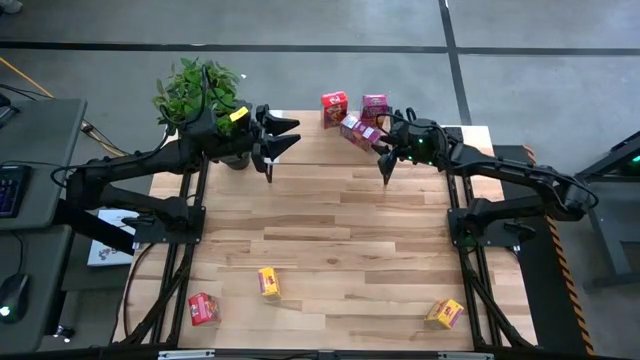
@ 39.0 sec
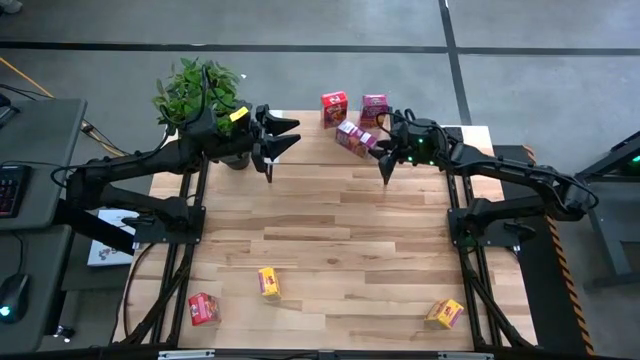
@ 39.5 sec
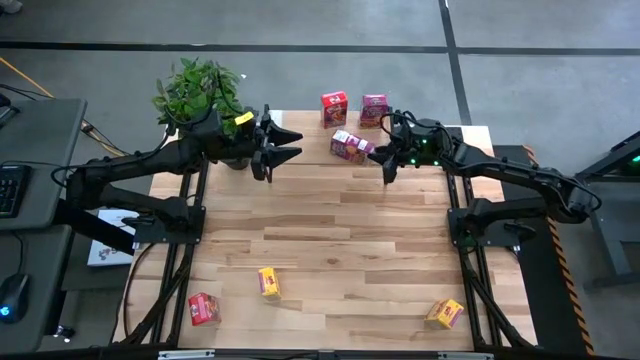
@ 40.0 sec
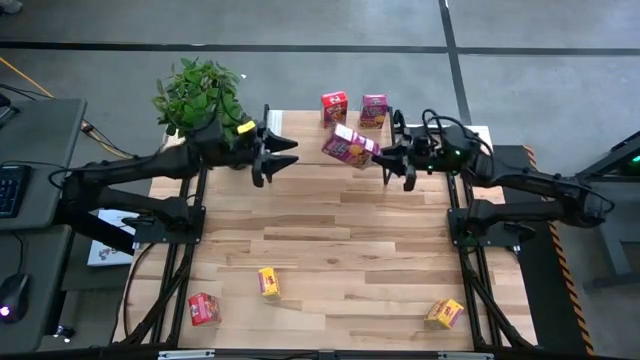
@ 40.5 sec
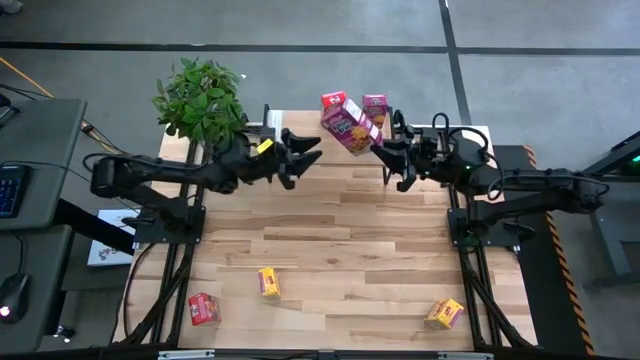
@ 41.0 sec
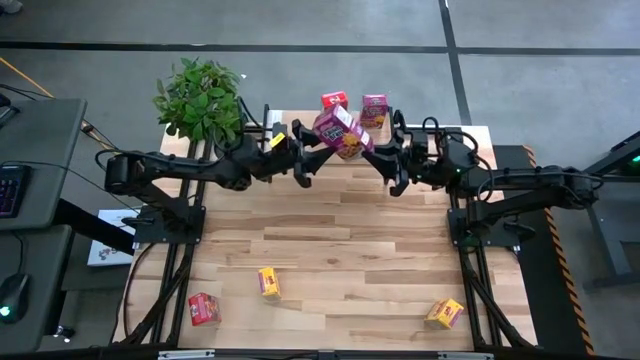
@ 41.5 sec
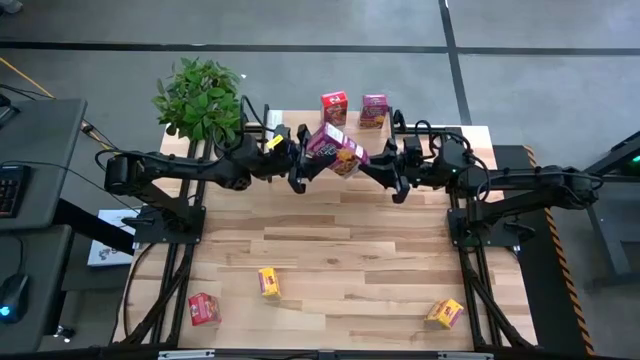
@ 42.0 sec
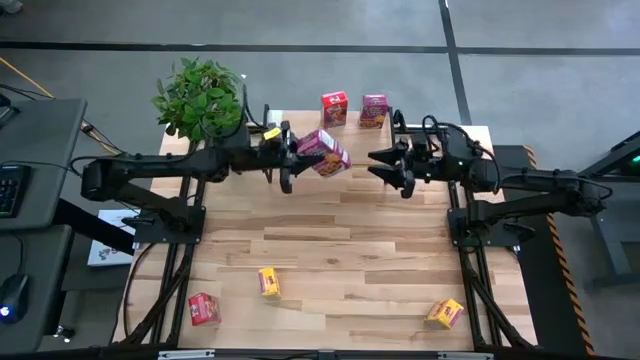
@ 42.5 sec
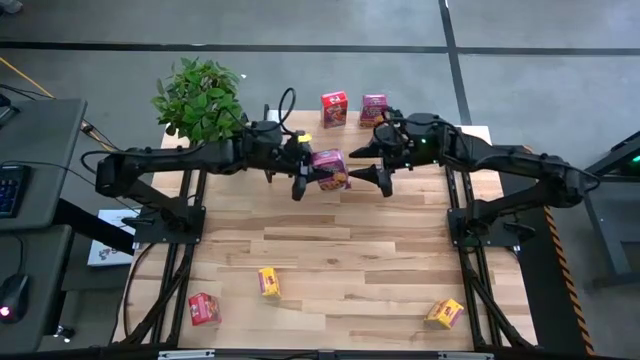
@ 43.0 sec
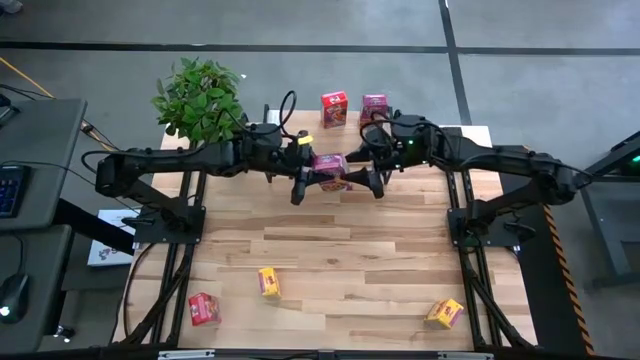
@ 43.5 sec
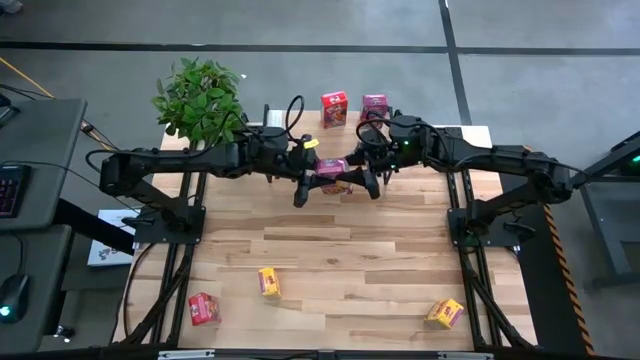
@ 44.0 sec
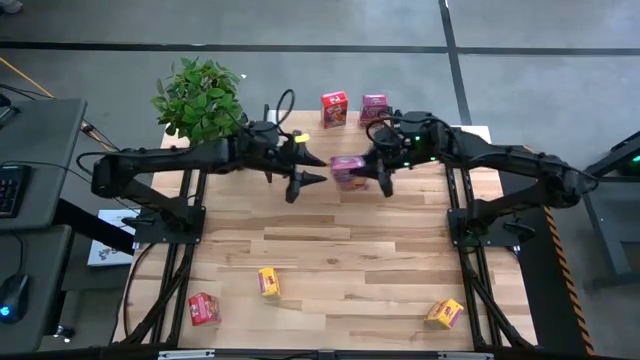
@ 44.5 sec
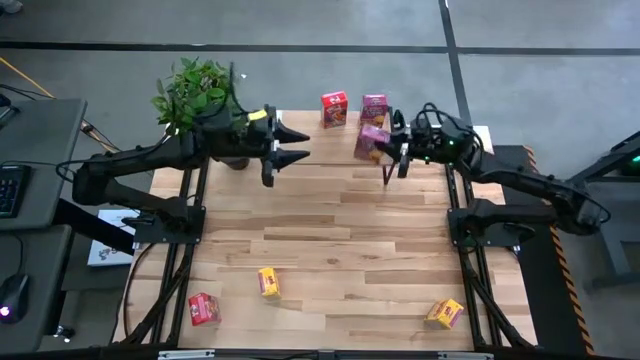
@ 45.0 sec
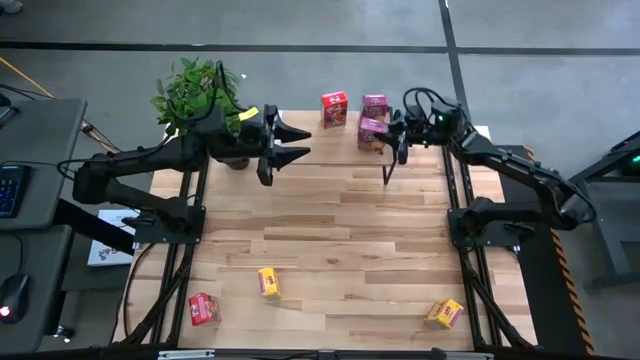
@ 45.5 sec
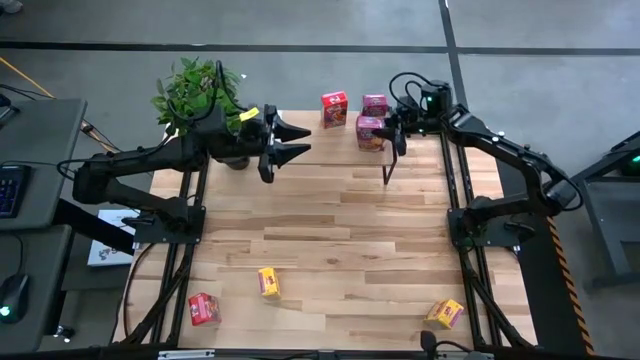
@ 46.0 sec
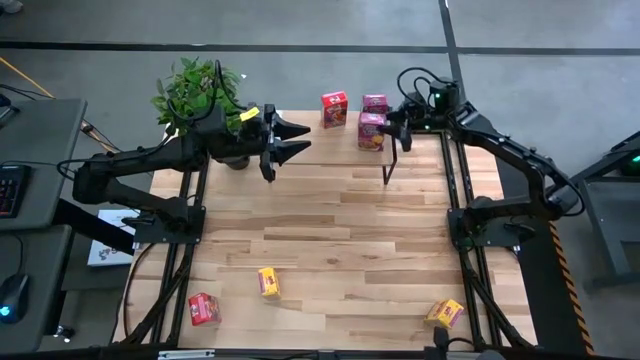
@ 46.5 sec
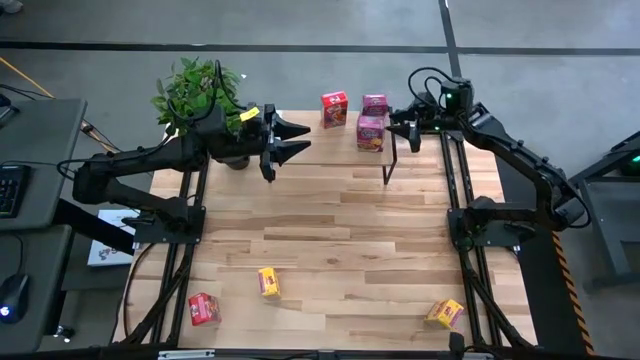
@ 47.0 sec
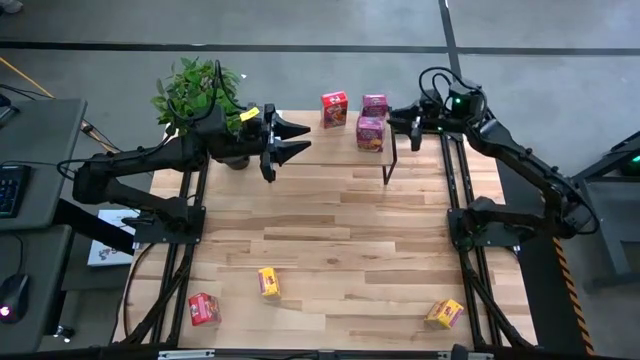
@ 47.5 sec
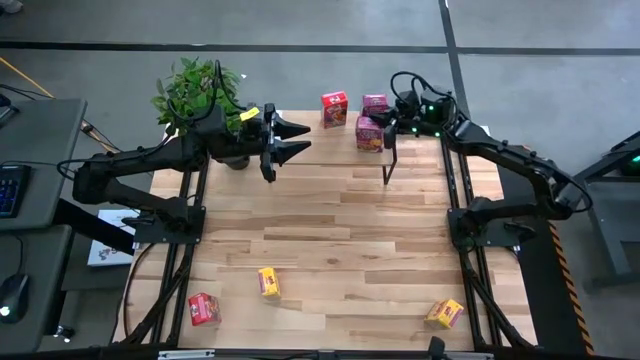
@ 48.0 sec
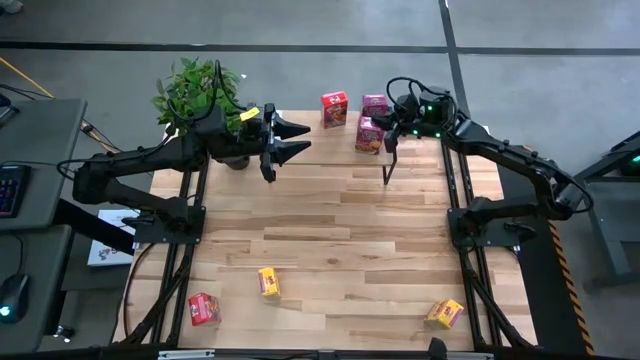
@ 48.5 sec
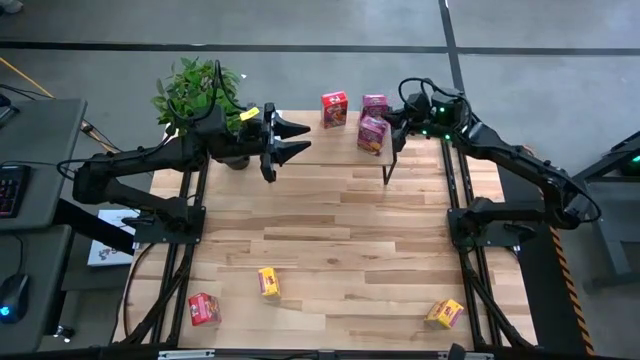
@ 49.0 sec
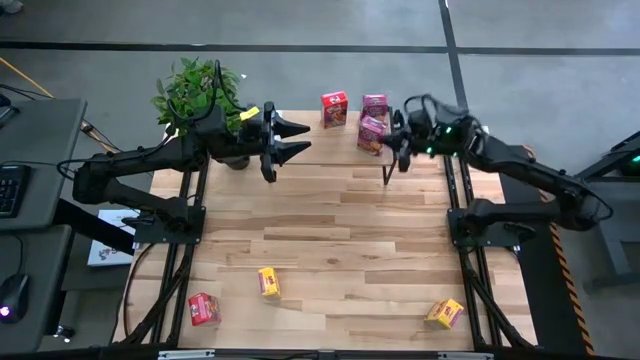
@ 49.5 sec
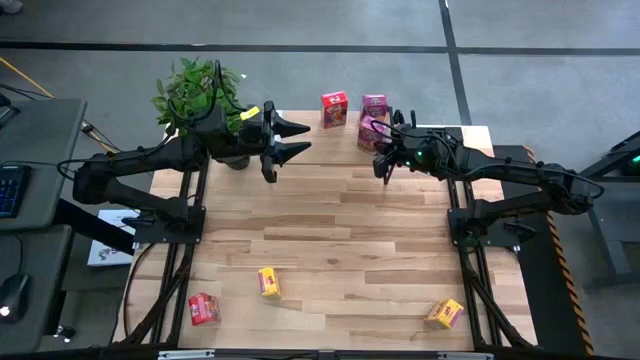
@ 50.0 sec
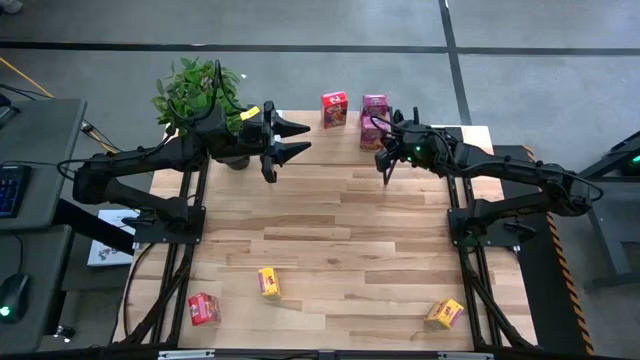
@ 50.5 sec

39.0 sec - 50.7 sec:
Task: Stack cereal on shelf
Put the purple cereal box on the shelf

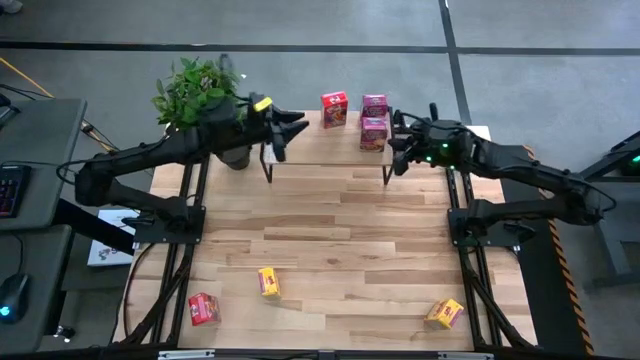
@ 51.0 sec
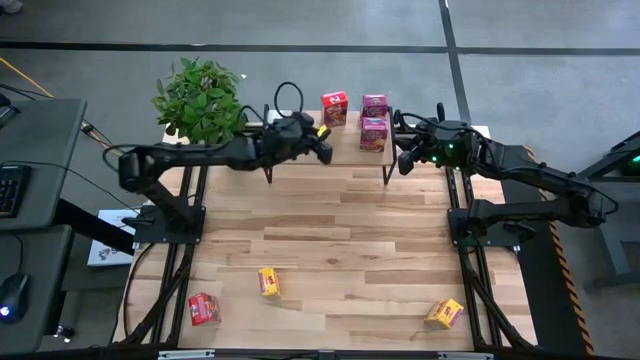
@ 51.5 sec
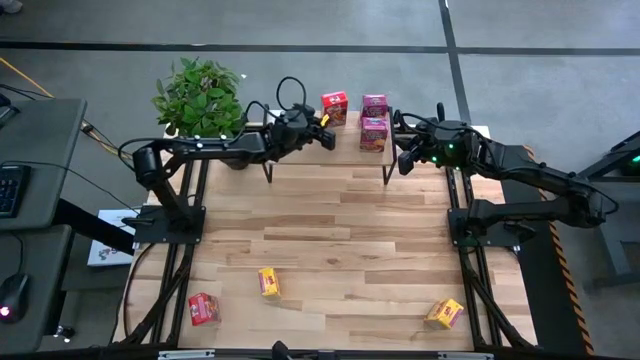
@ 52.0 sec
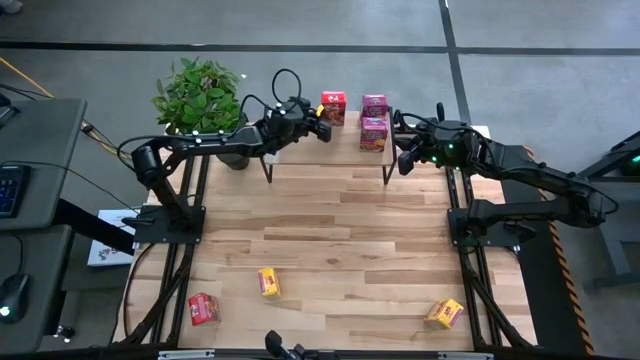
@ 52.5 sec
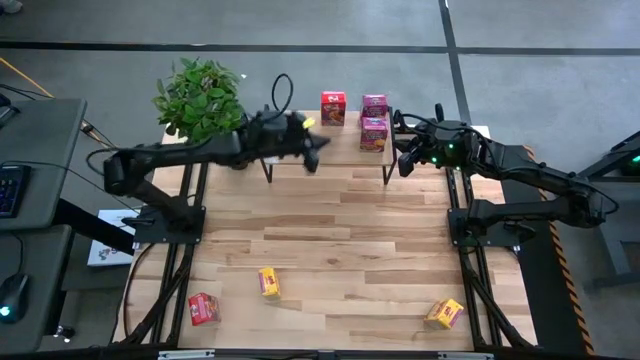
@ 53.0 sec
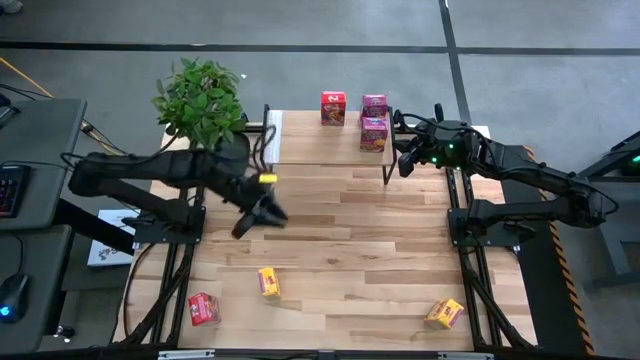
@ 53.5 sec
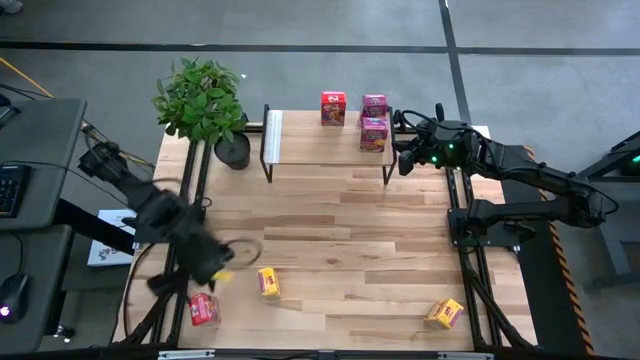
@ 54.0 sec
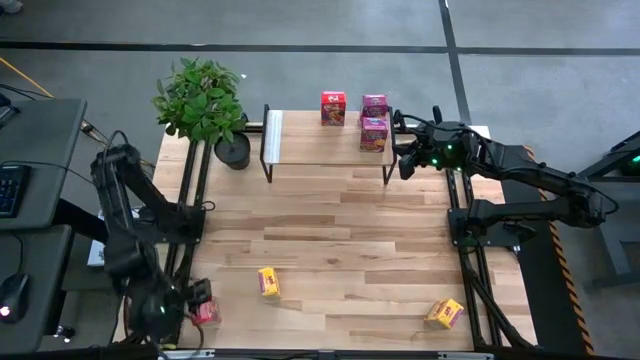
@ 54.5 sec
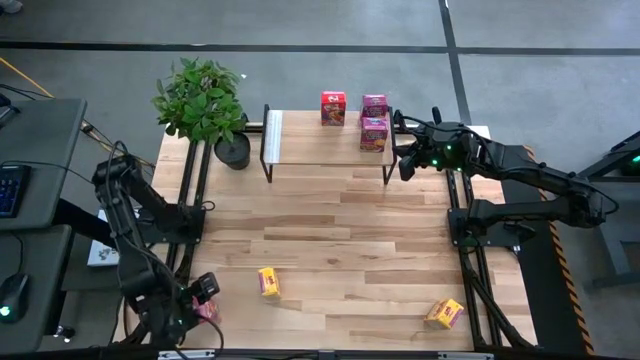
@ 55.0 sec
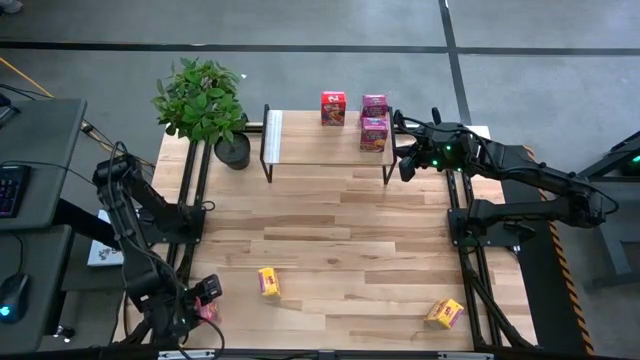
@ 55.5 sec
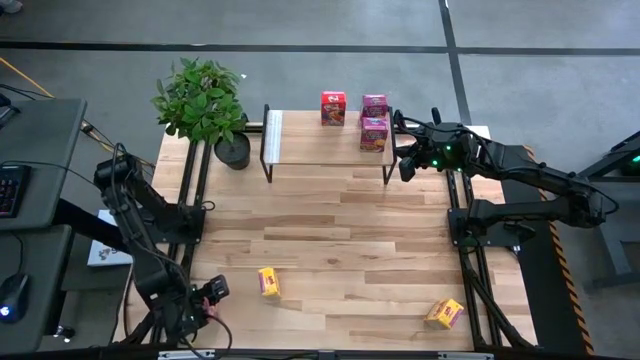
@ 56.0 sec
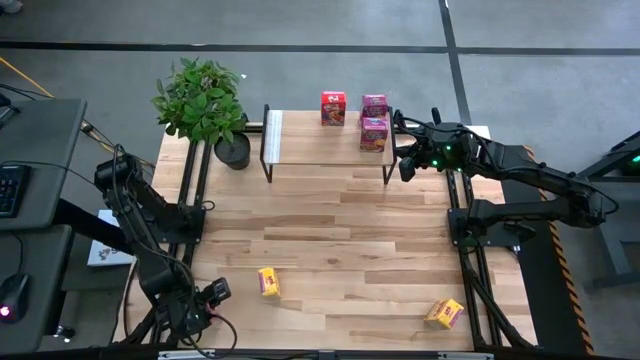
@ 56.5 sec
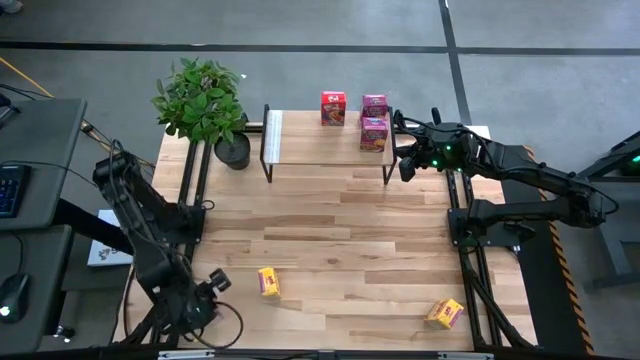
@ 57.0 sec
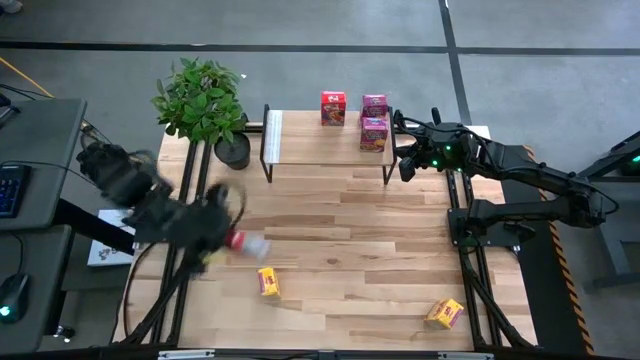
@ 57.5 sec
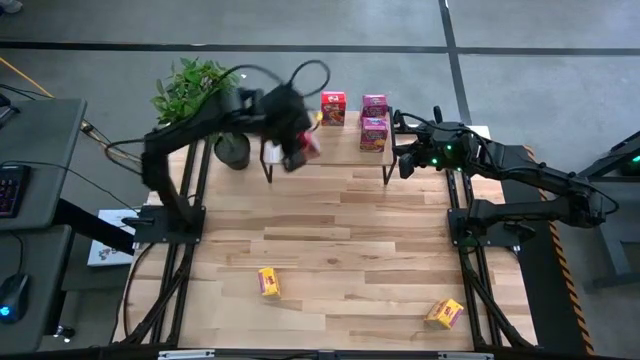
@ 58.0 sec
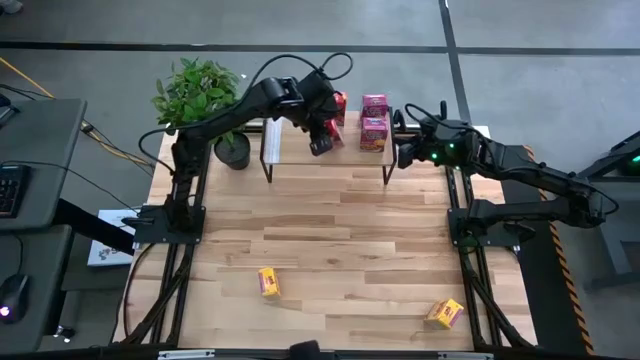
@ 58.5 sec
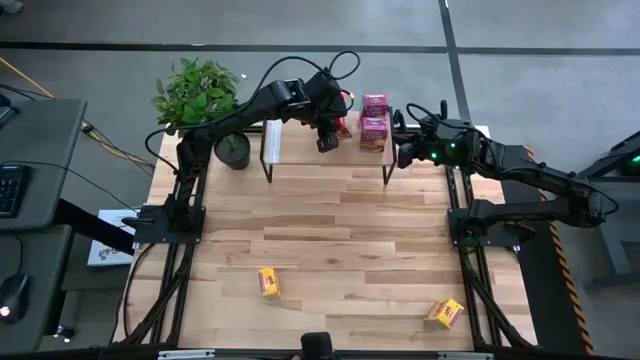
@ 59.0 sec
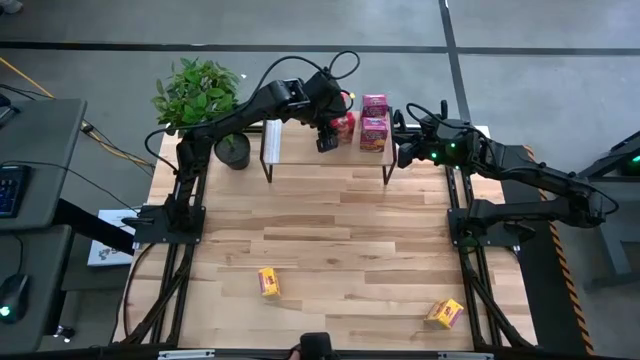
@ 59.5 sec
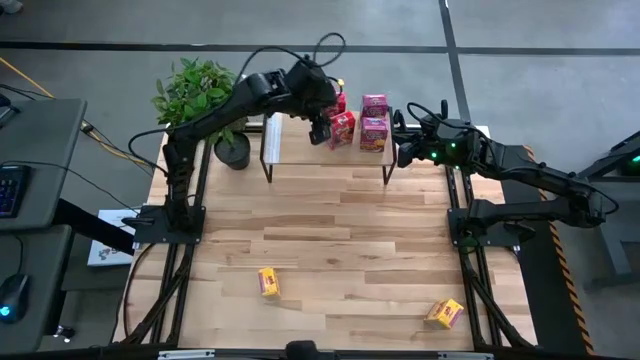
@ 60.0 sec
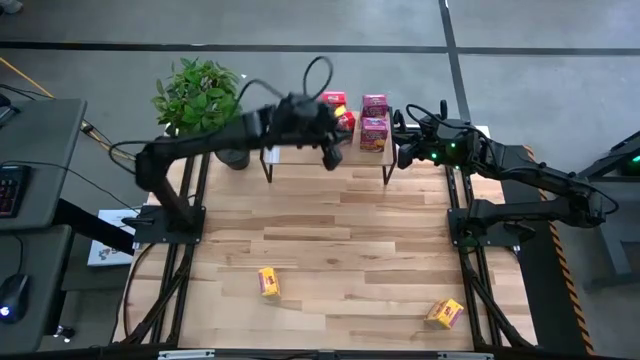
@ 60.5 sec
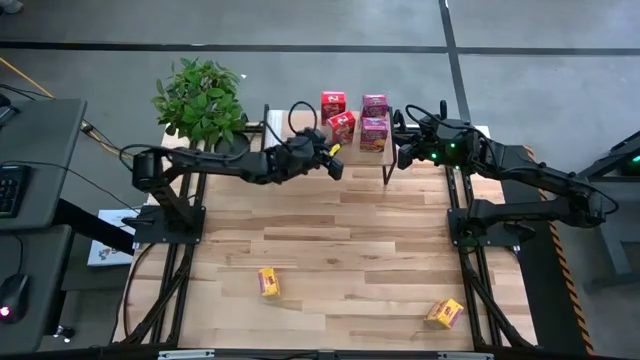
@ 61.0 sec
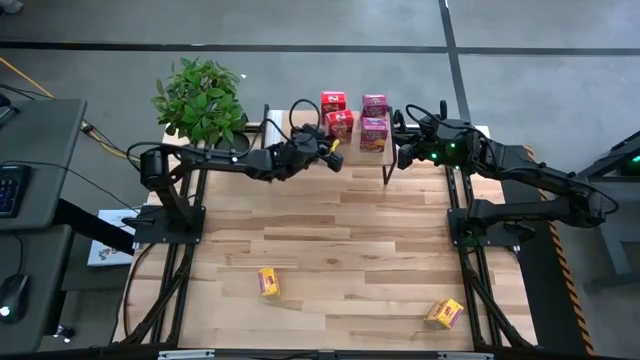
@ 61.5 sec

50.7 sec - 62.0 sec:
Put the red cereal box on the shelf
